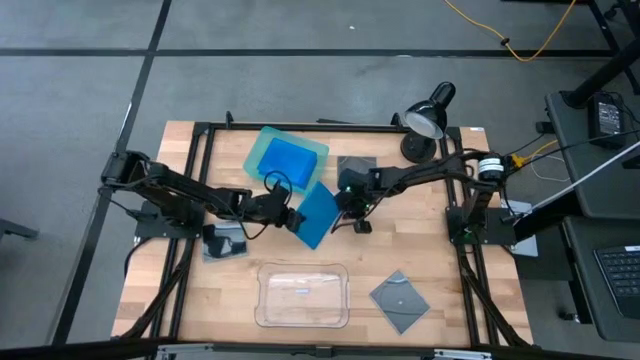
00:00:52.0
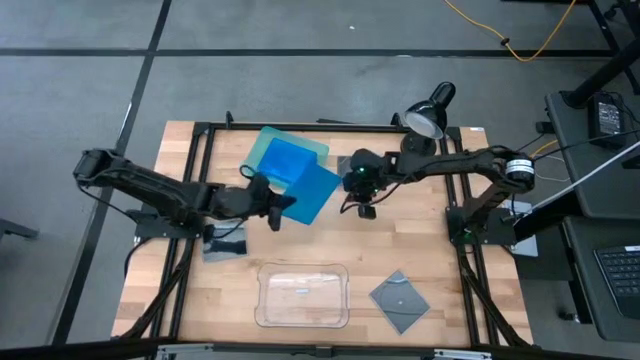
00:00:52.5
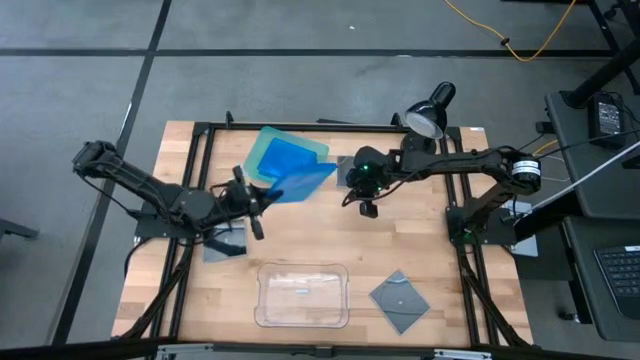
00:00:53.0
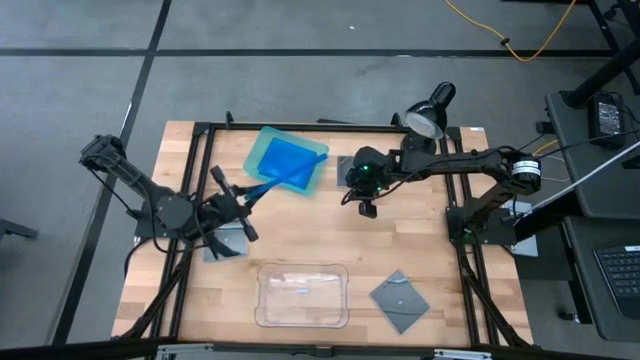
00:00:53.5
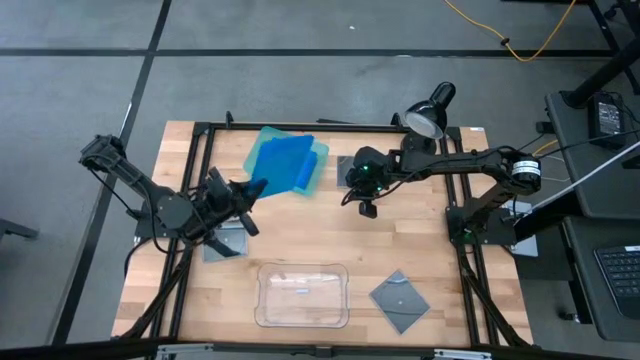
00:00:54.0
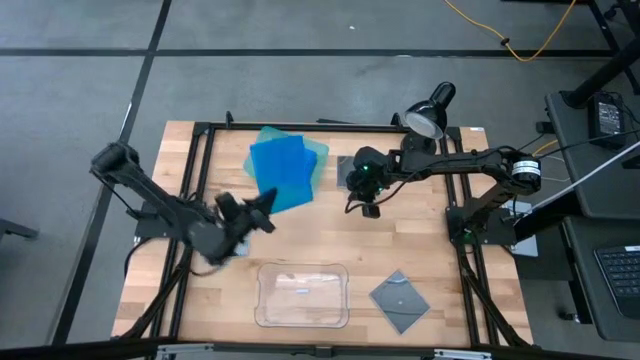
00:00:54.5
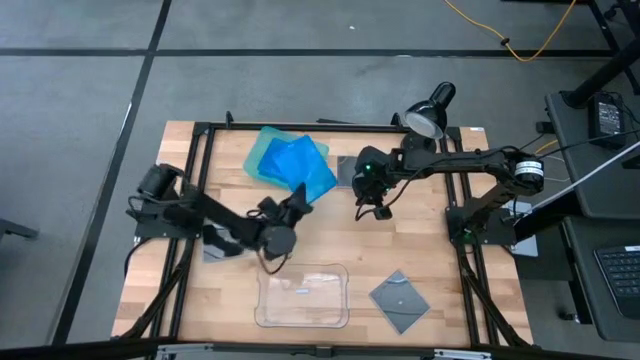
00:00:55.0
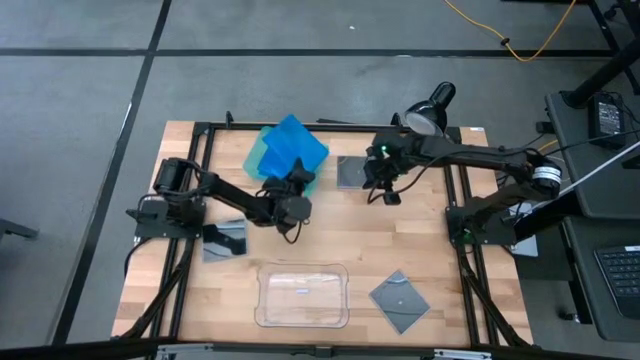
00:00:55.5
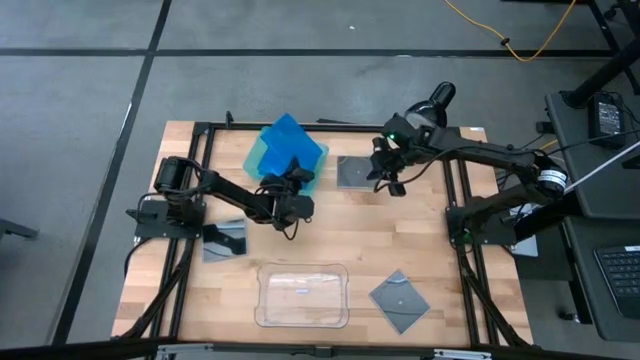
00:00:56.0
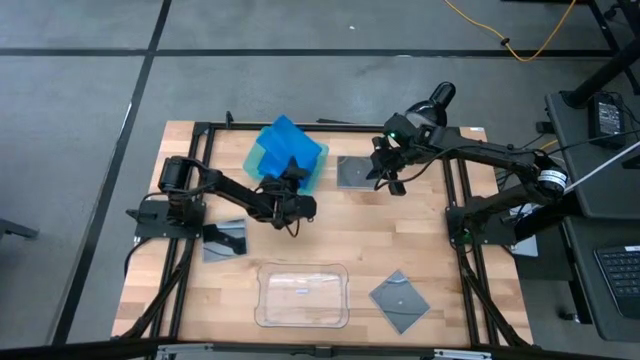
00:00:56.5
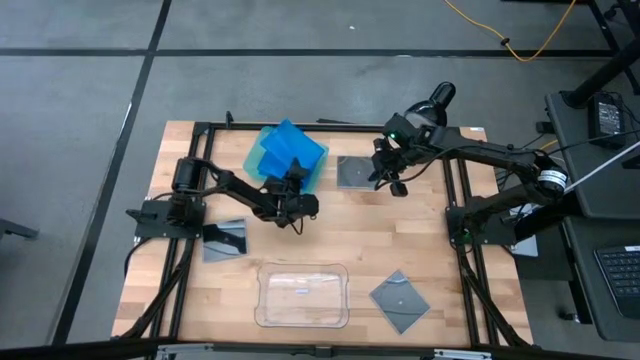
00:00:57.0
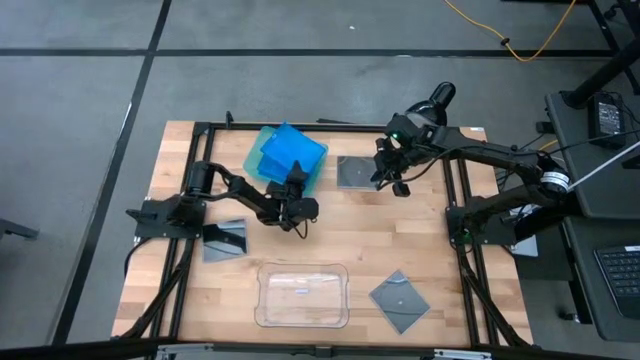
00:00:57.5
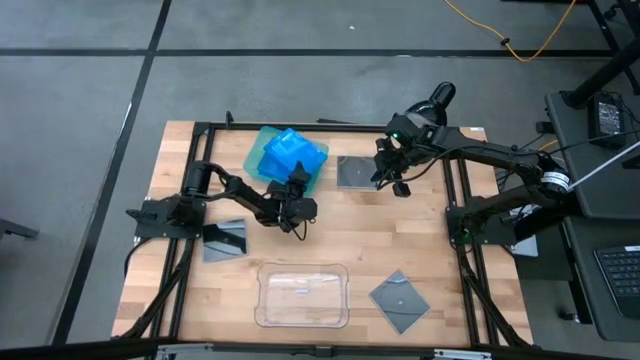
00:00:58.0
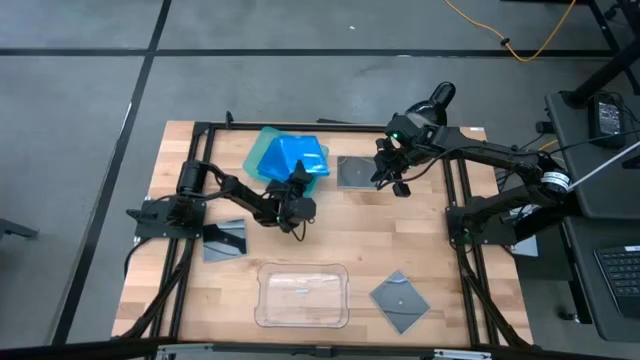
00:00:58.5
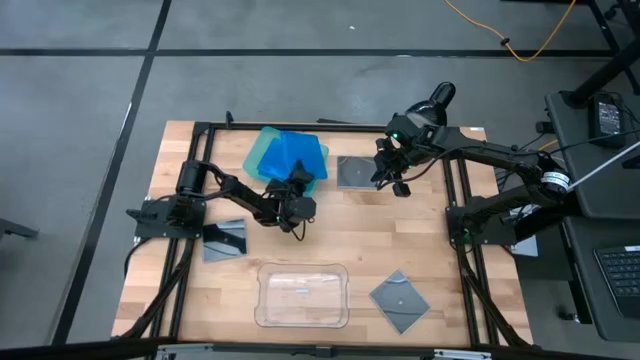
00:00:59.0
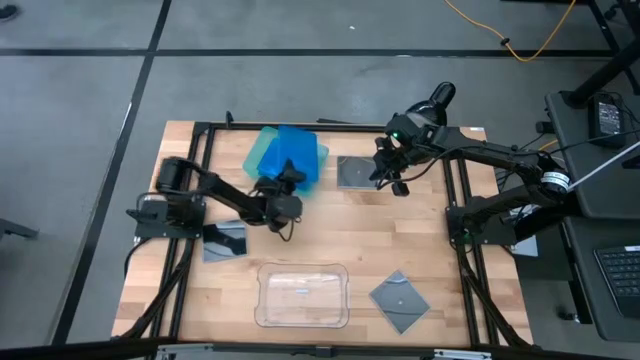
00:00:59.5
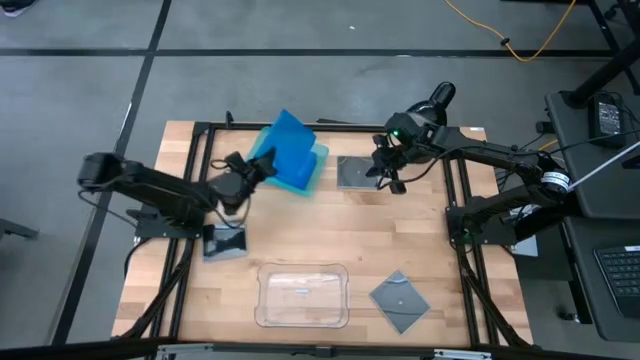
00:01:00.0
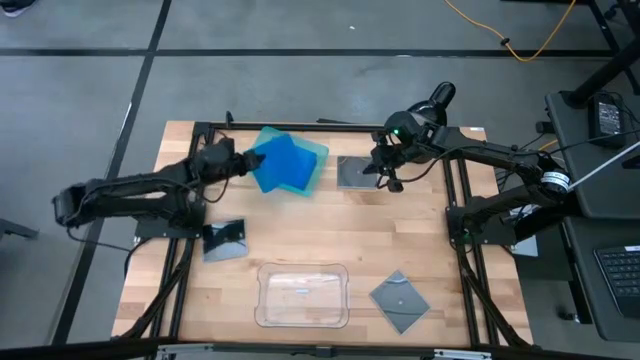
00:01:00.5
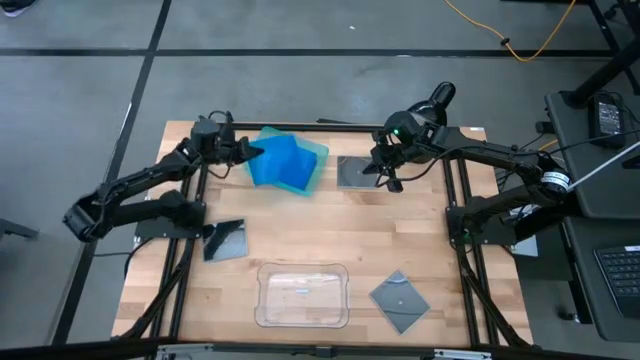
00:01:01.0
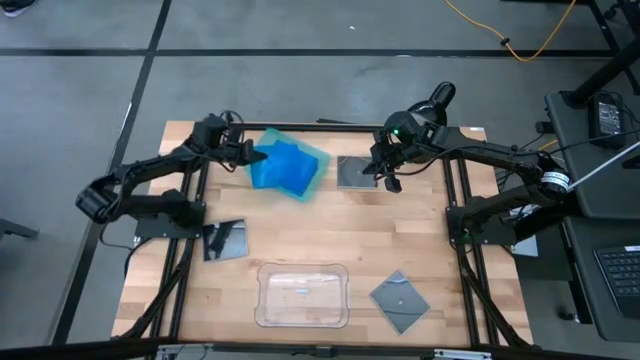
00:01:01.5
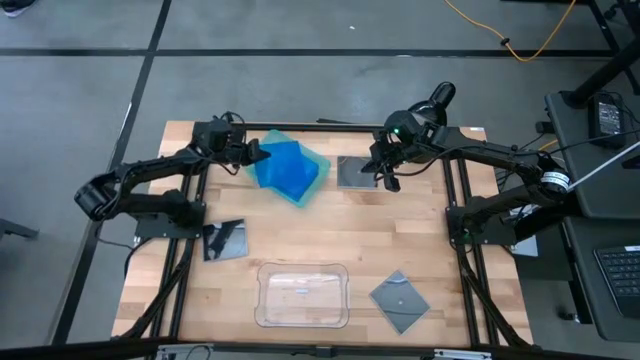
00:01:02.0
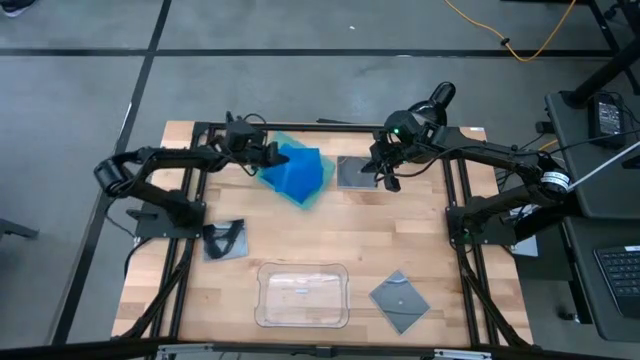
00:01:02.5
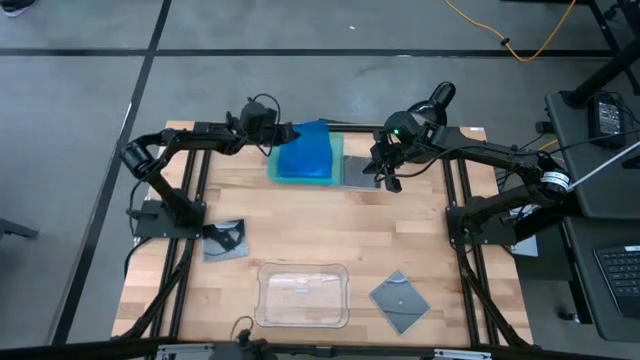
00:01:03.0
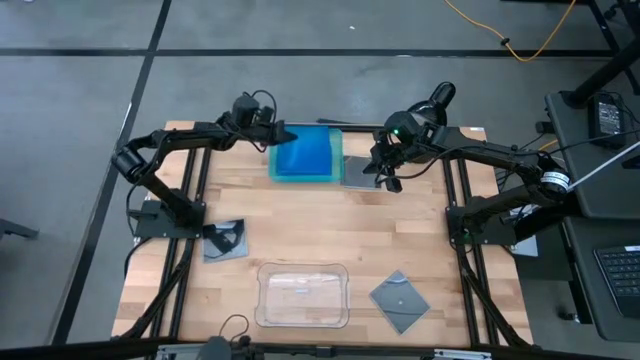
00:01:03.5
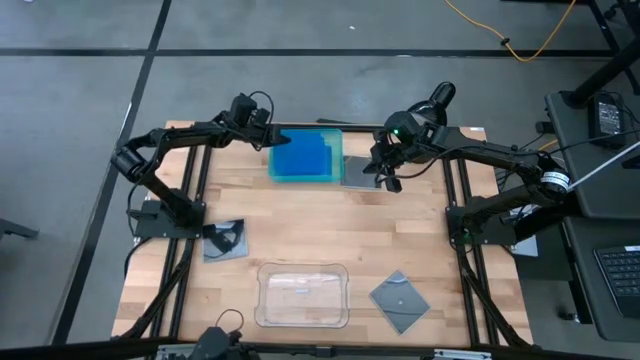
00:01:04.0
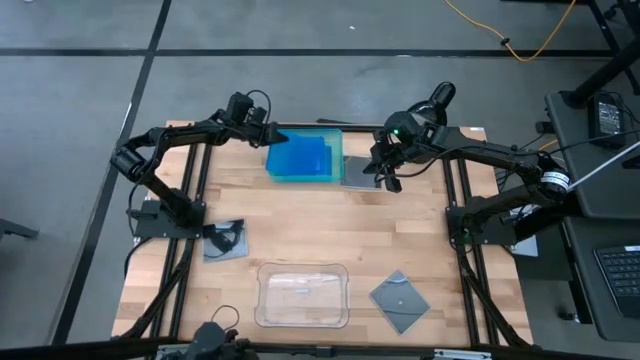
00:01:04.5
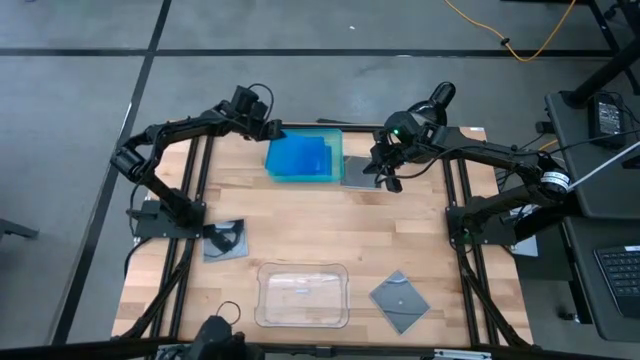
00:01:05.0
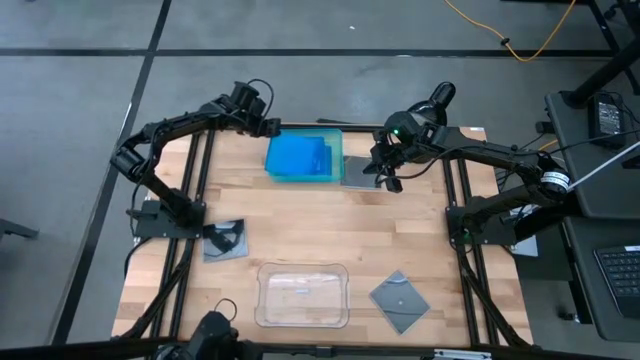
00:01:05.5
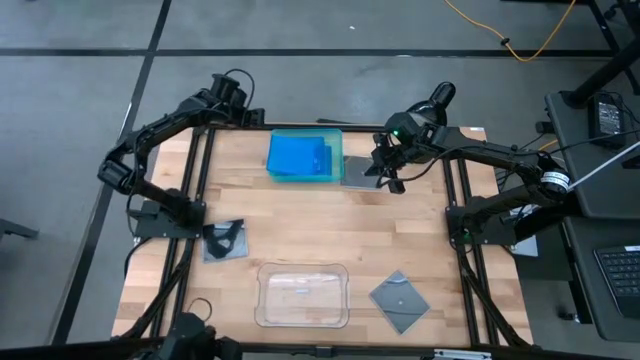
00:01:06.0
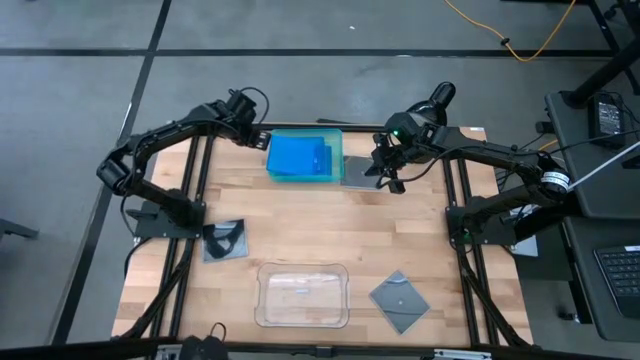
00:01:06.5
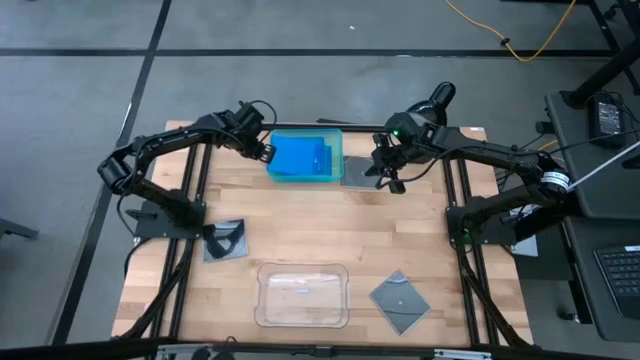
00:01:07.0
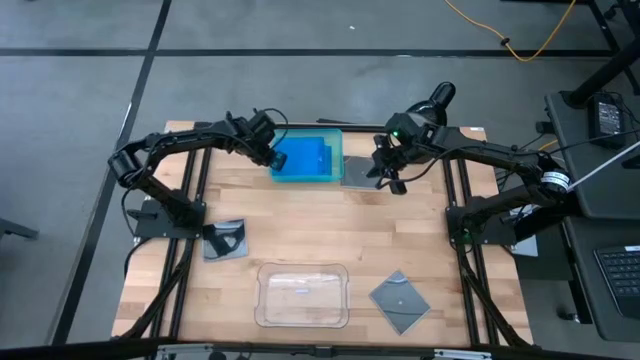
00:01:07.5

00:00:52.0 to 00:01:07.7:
Task: Pick & place jewel cases by type
Put the blue cd case into the green bin

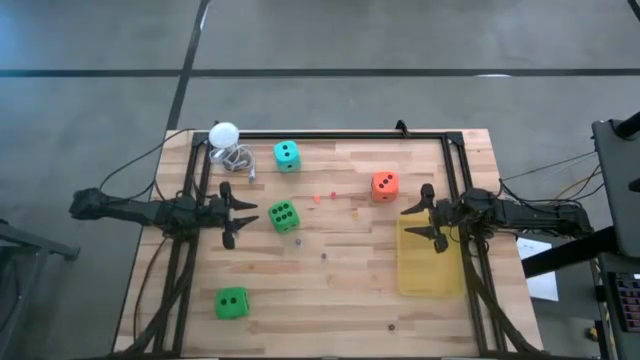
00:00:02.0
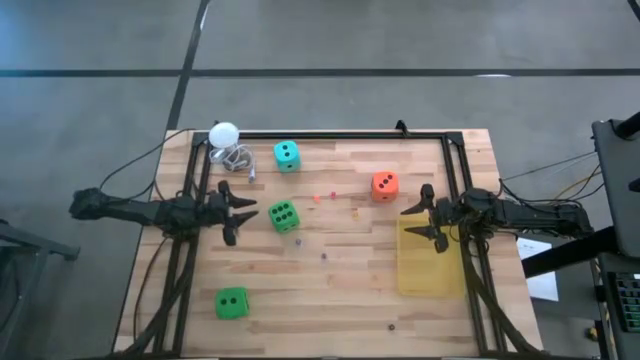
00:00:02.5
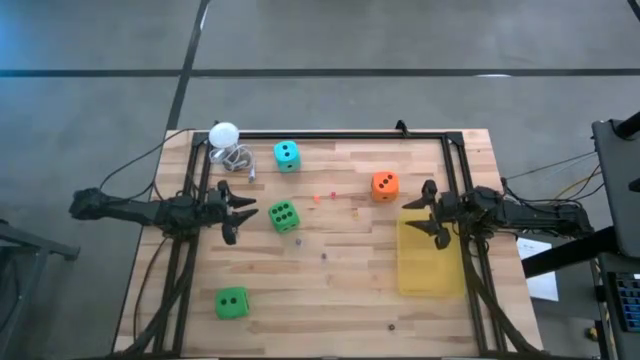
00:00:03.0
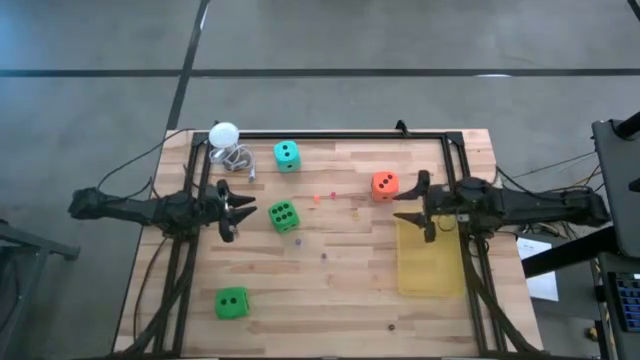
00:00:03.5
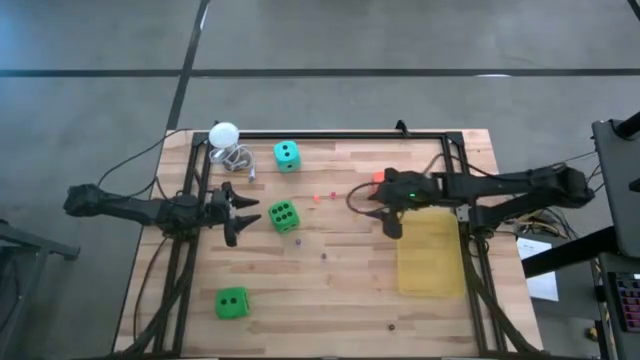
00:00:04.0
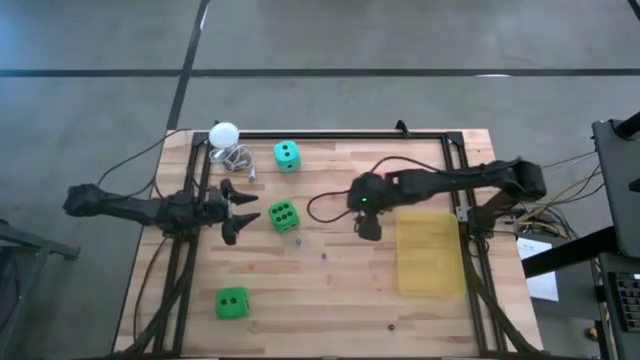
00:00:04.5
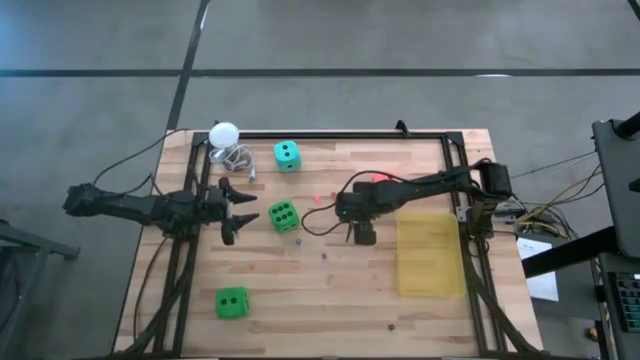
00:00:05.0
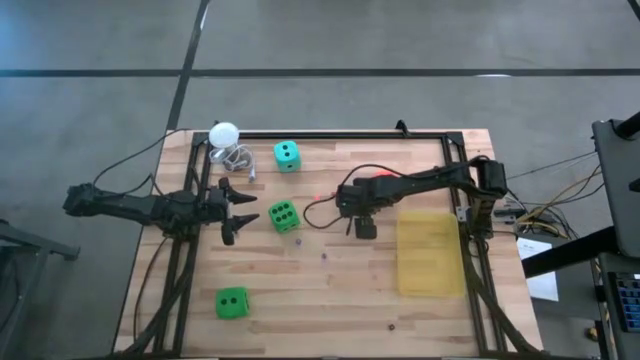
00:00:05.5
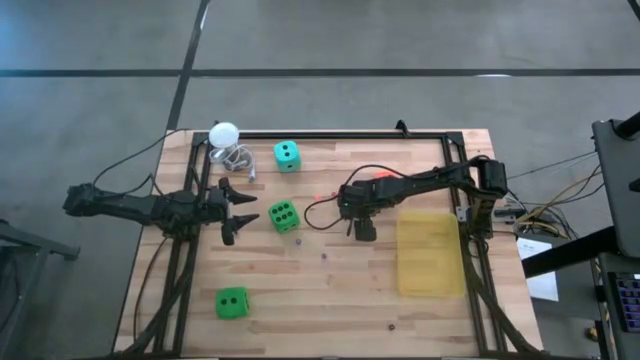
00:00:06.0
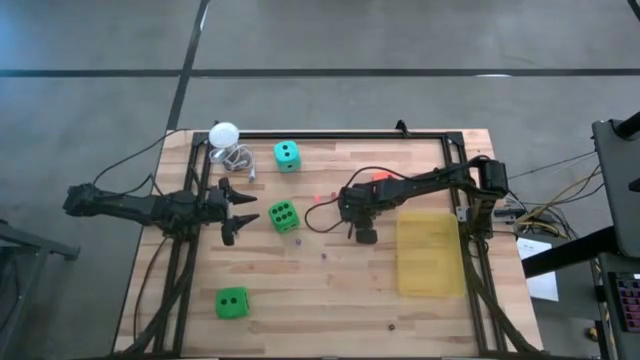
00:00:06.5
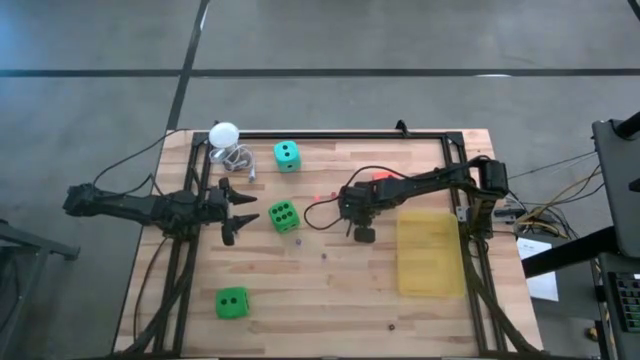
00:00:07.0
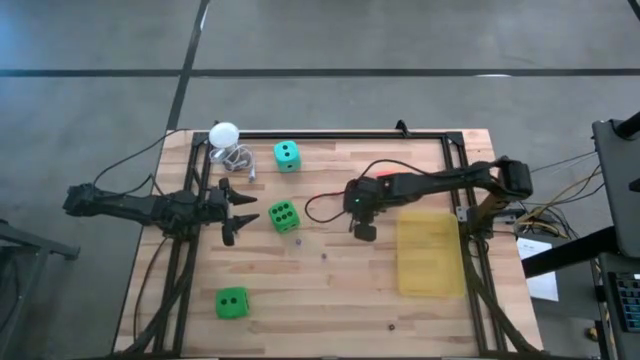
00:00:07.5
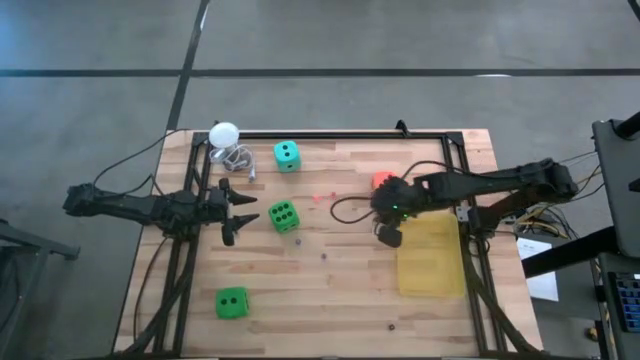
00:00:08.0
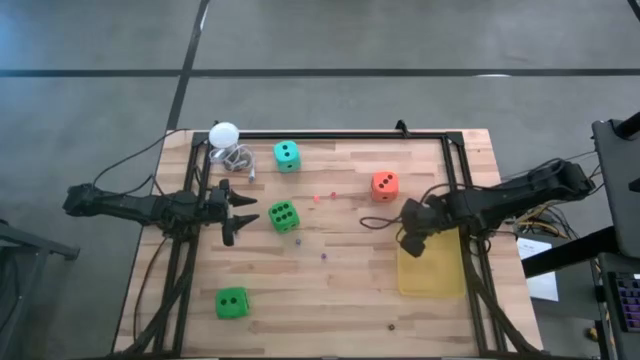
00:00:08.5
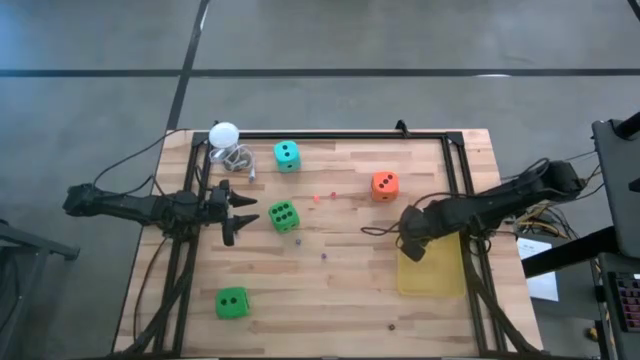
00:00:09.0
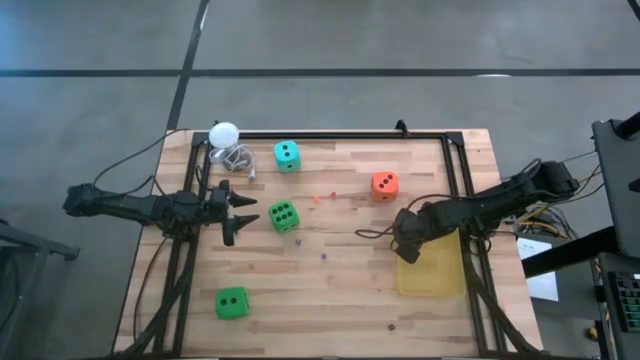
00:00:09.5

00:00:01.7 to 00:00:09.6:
Task: Pick & Place Dice
Put the small yellow dice into the yellow bin
